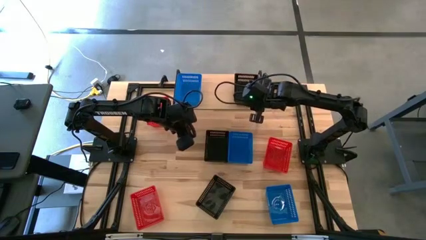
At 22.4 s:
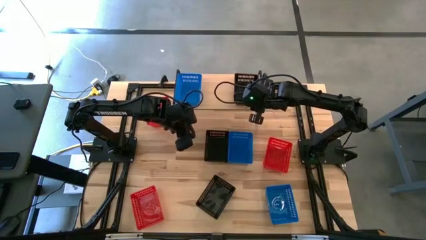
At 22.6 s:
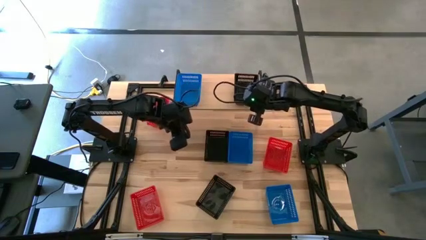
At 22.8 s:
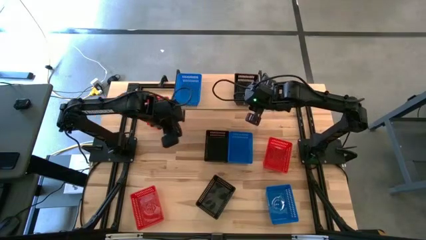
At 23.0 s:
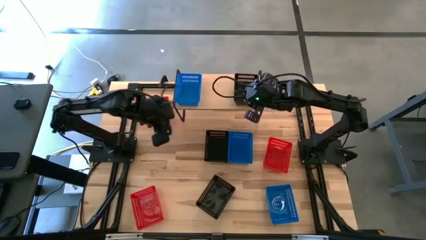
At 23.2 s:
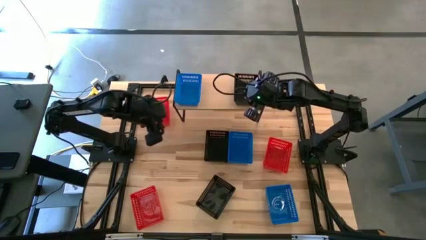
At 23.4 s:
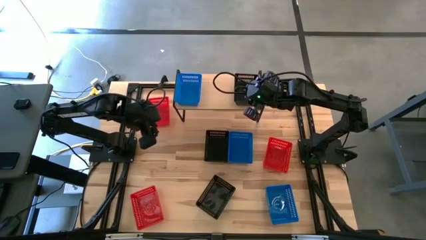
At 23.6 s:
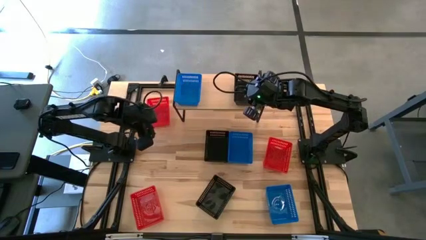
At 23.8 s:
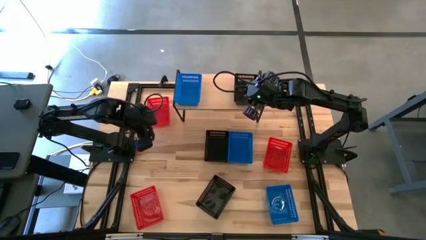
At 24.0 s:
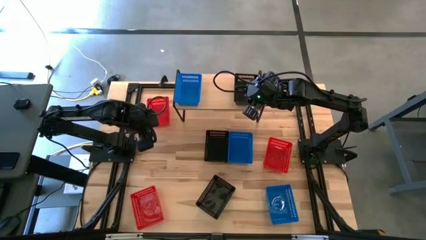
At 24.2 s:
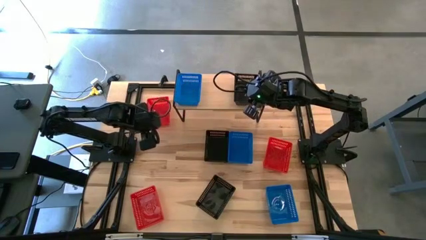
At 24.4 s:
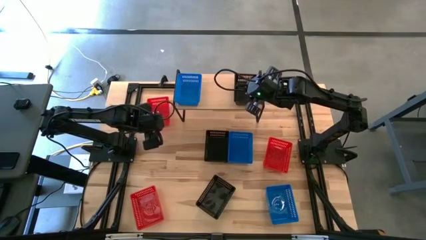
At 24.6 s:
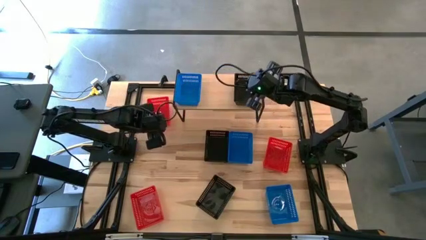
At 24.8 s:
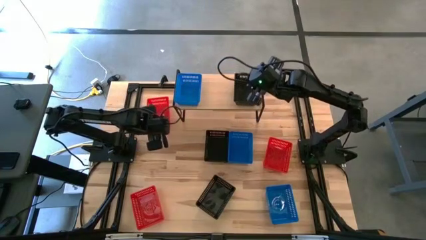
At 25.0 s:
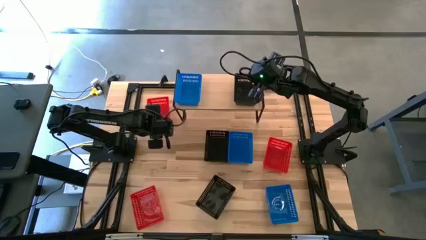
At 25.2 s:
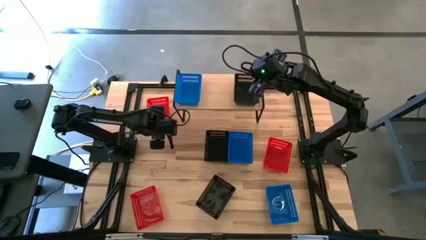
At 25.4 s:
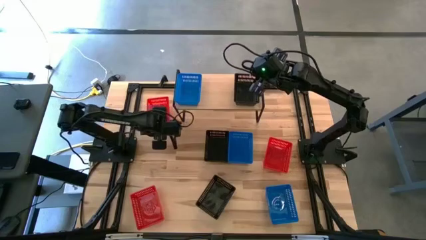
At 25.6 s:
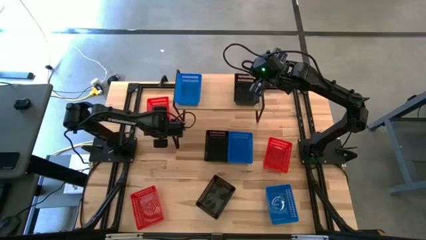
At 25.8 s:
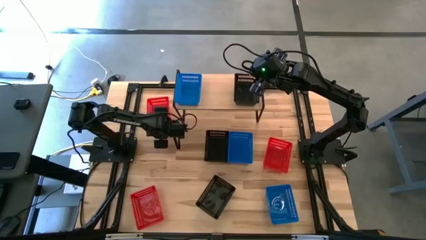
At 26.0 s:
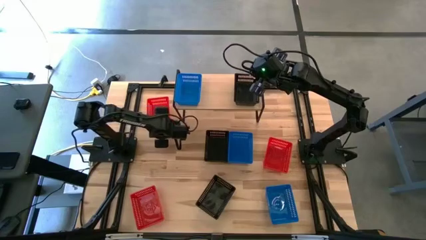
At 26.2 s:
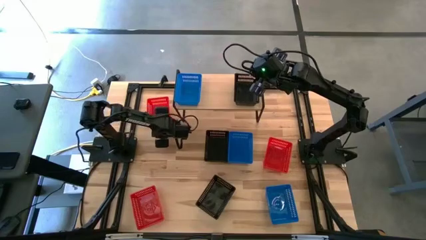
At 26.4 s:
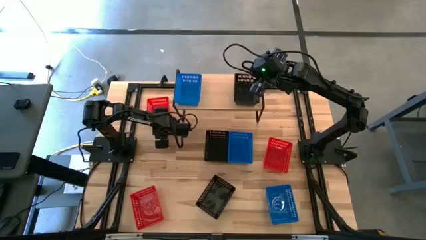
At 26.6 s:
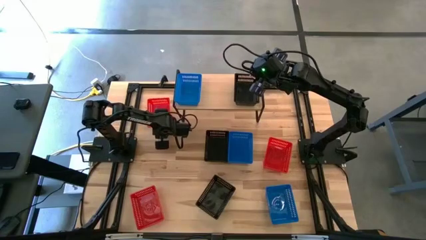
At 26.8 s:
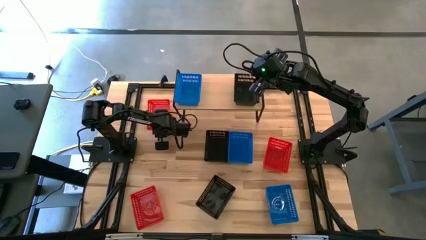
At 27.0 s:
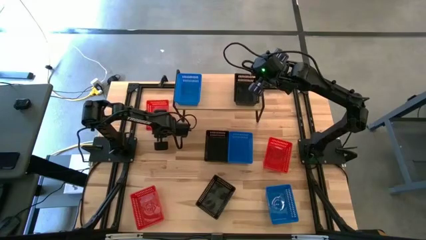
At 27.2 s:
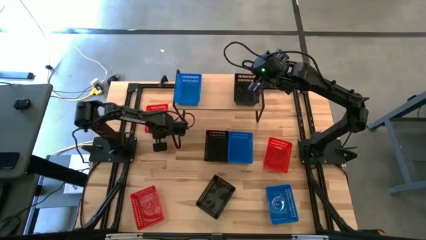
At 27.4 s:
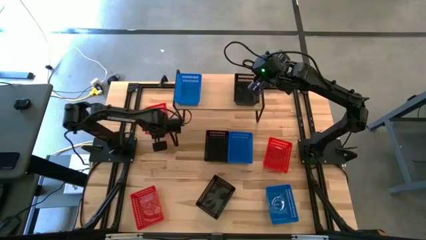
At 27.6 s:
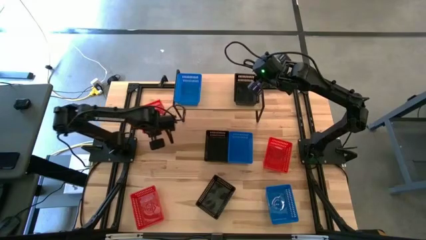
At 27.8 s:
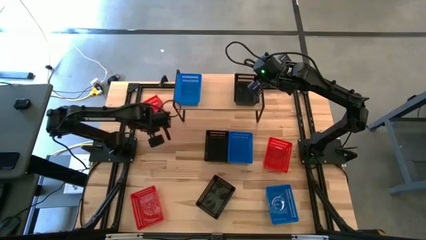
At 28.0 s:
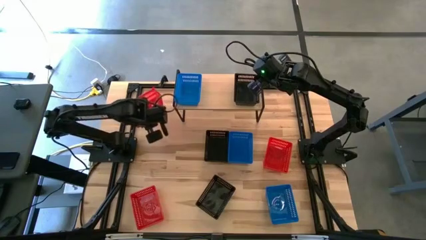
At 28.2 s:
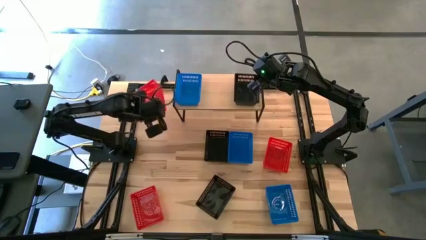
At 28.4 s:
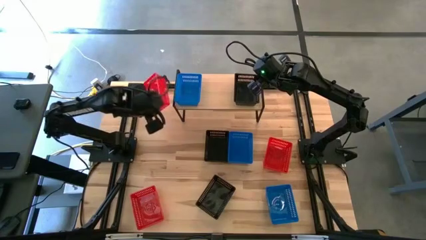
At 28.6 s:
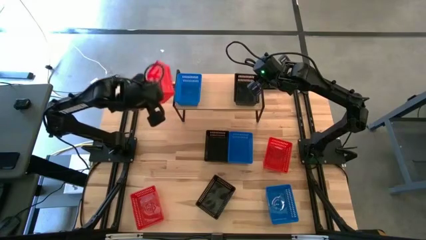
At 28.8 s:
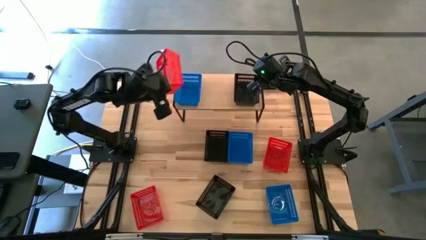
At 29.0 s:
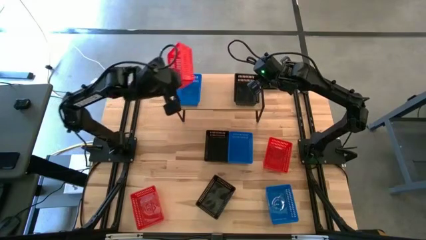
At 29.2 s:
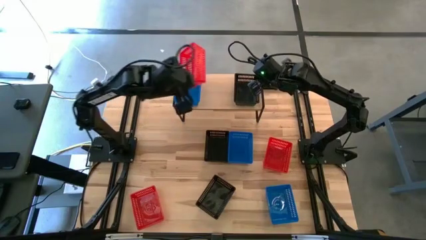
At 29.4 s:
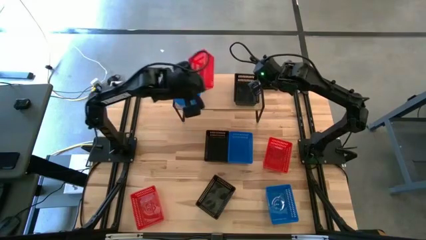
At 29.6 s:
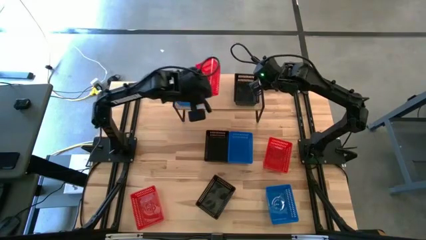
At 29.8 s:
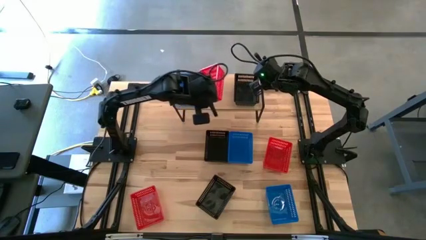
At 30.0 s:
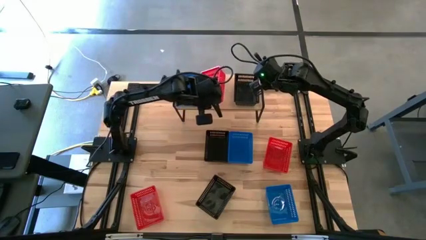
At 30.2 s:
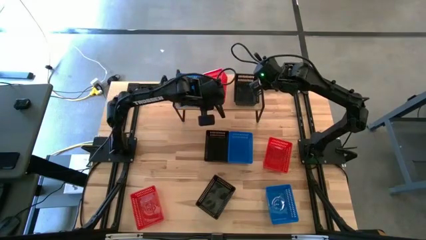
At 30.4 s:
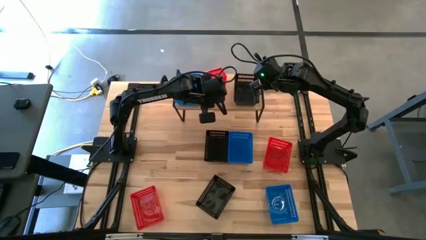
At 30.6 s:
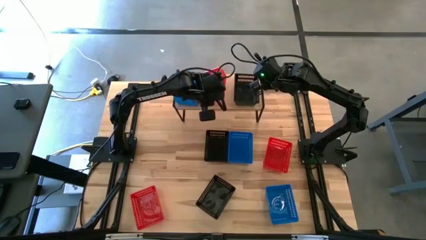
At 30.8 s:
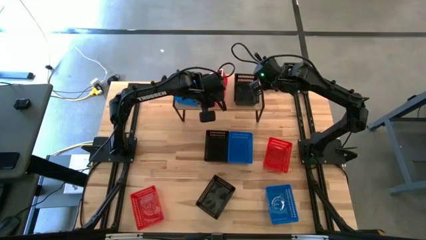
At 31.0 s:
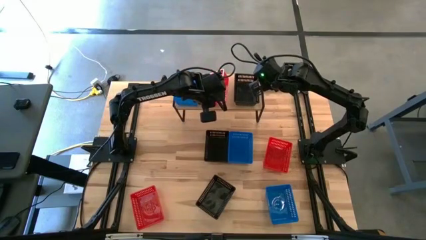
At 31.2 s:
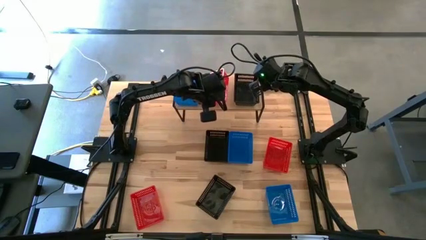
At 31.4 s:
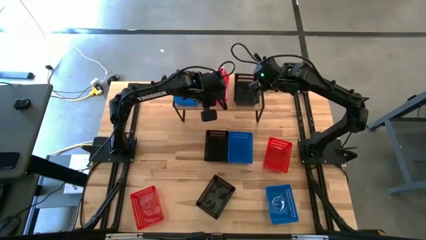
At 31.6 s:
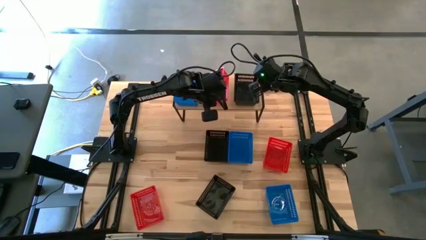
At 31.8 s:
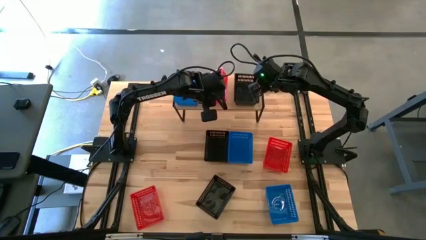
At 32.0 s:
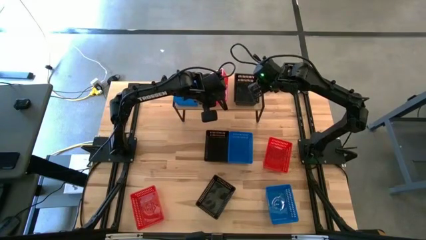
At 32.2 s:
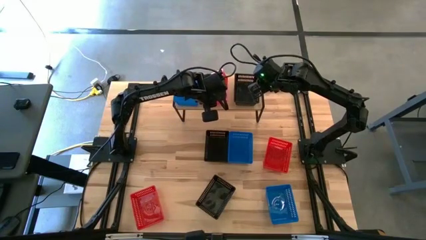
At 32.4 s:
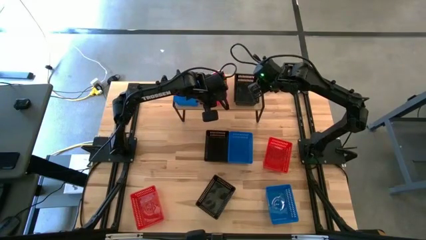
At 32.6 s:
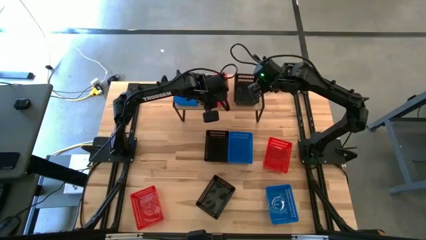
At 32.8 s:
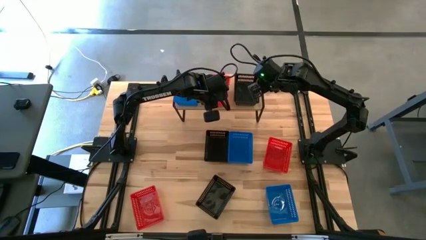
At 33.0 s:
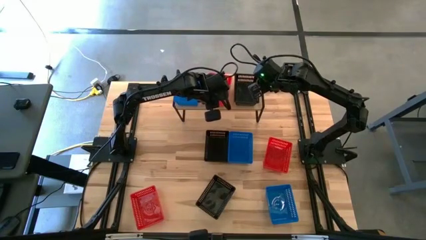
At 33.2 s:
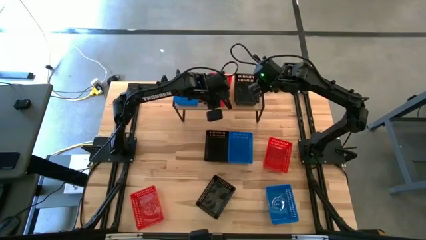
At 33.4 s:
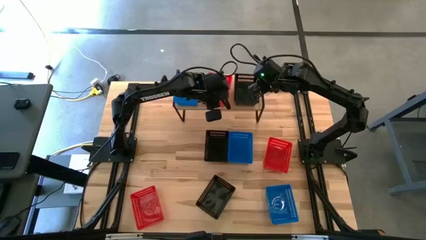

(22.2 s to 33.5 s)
Task: Stack baskets on shelf by color
Put the top left red bin on the shelf

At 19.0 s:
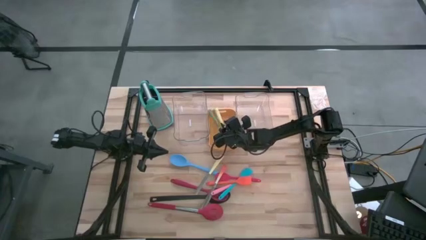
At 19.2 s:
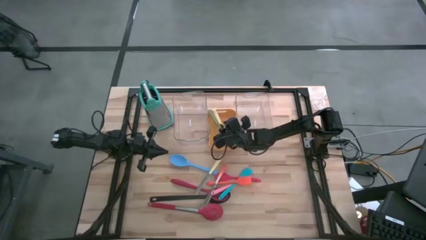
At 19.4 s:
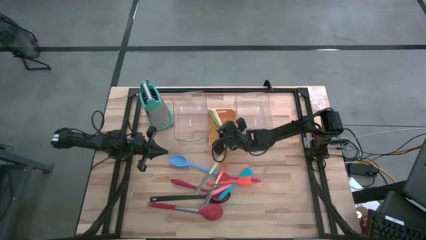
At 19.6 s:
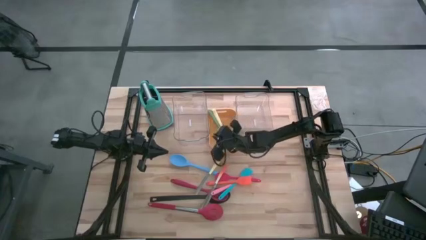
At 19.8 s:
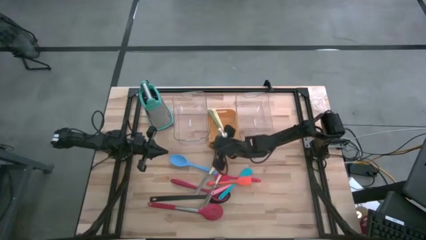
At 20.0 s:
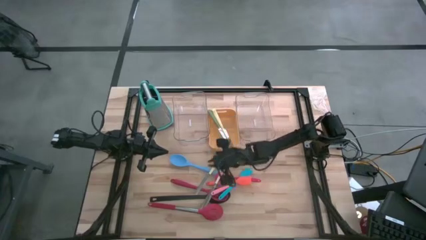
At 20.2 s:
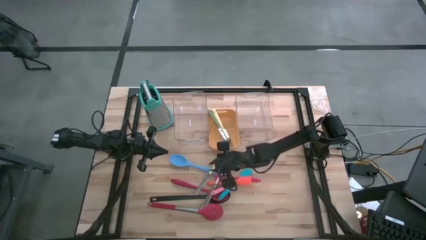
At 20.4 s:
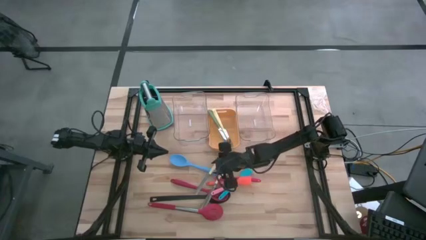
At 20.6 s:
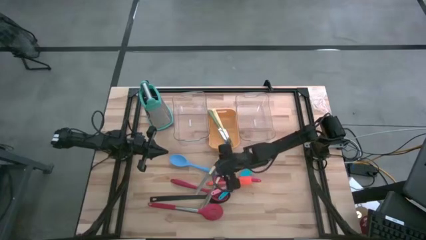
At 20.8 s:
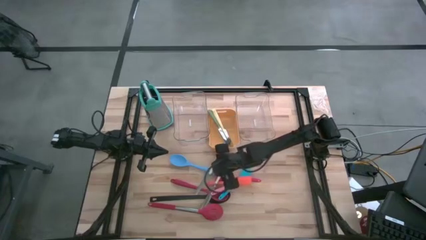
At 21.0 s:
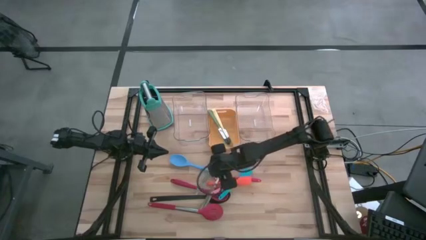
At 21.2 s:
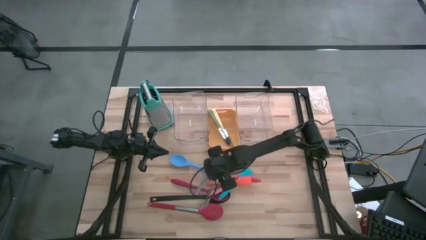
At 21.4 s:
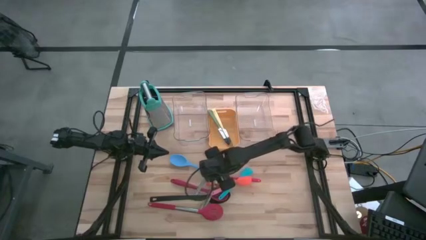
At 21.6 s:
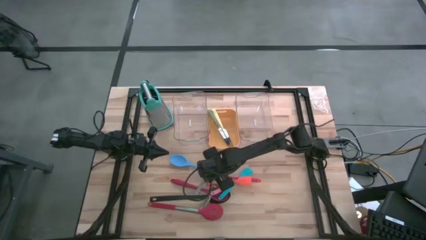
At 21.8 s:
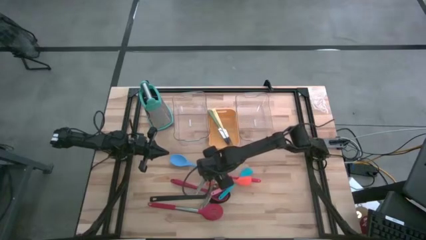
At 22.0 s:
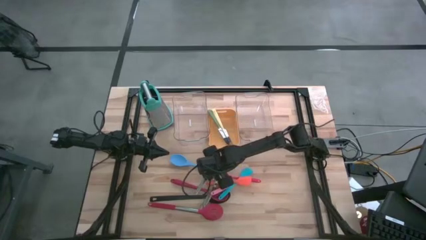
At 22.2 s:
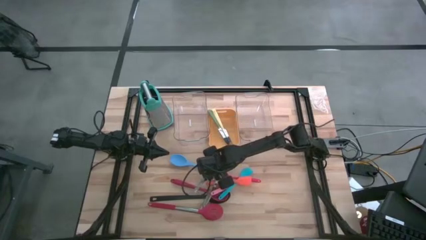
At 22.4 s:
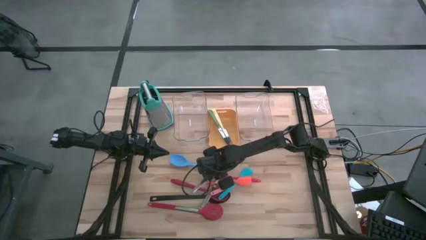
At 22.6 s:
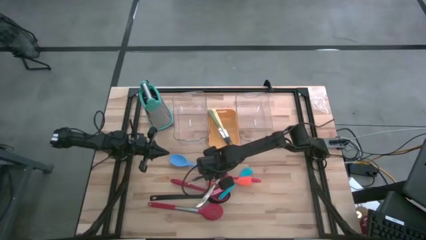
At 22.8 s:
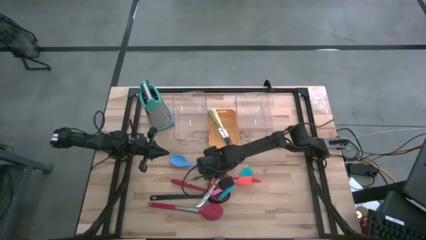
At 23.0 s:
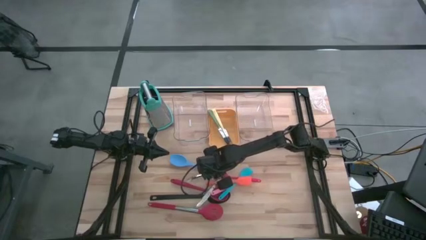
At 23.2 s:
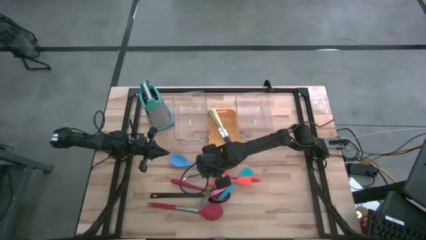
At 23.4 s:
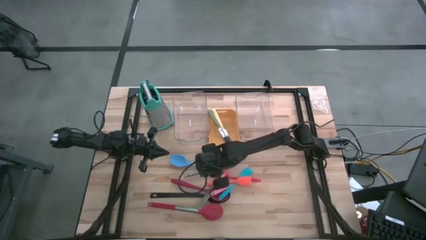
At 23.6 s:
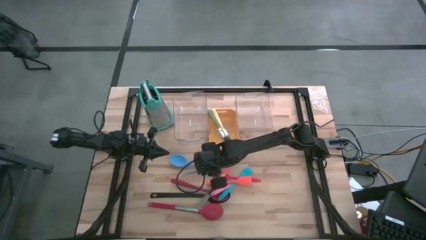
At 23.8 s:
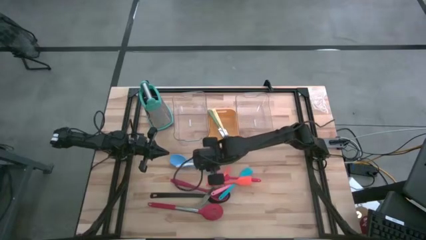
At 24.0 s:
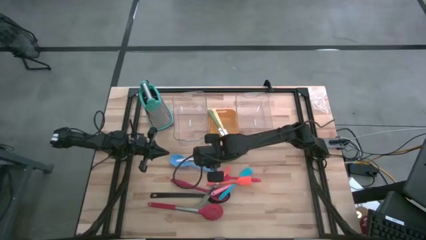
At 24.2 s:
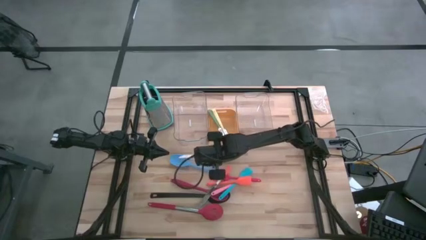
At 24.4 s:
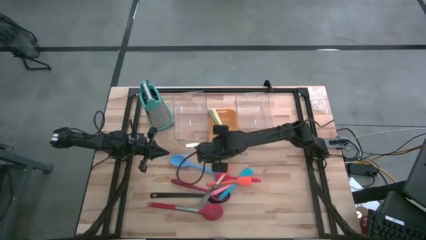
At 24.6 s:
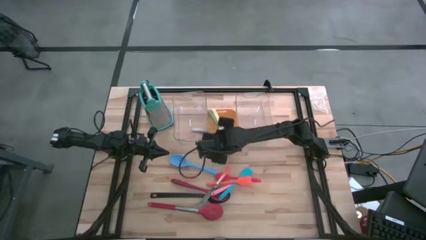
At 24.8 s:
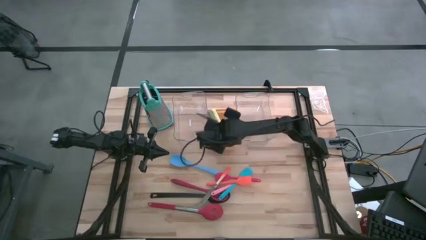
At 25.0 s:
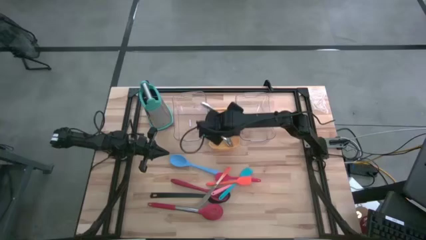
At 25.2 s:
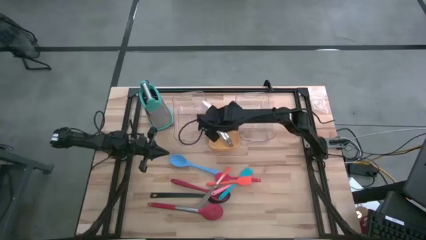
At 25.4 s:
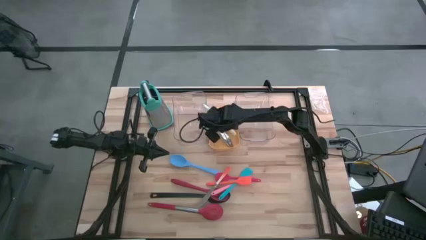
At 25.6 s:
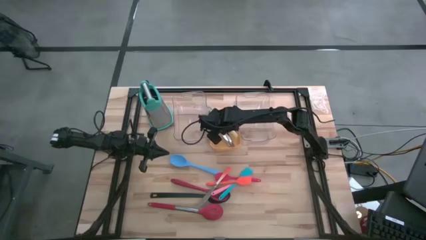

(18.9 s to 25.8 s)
Task: Pick & Place Kitchen Items
Put the yellow table knife into the orange bin
